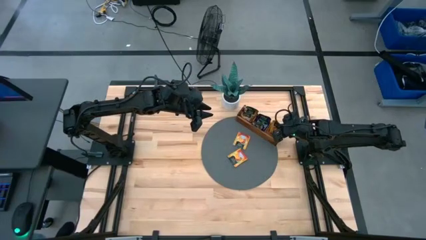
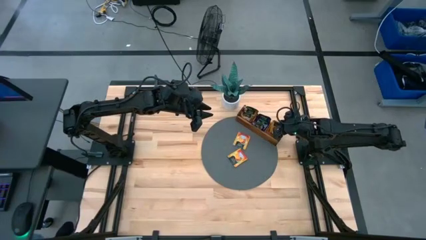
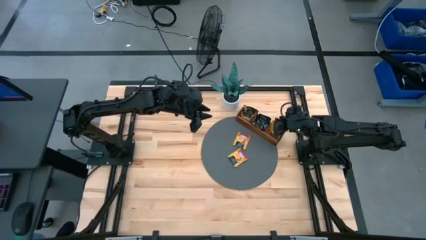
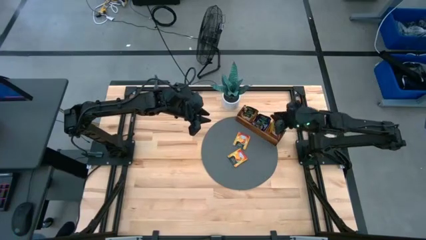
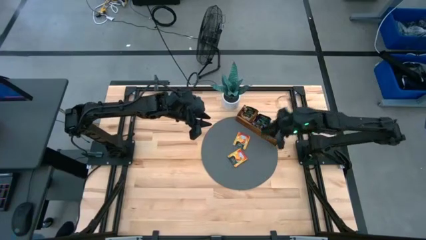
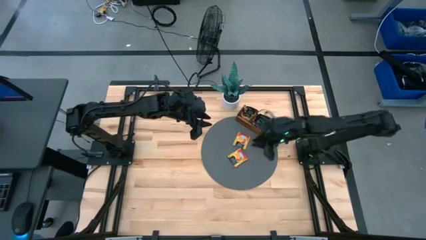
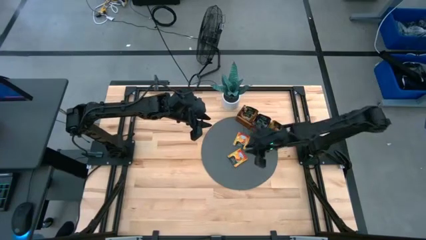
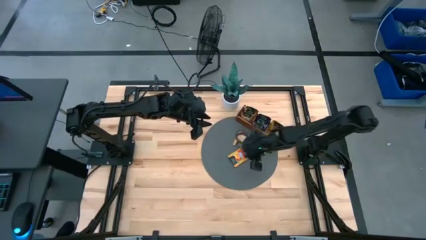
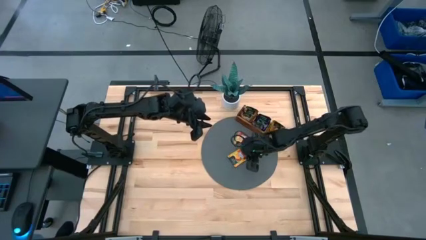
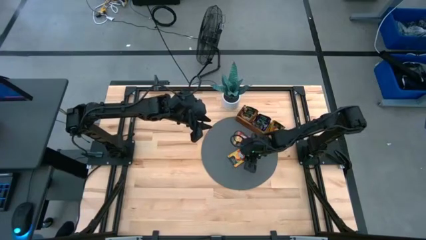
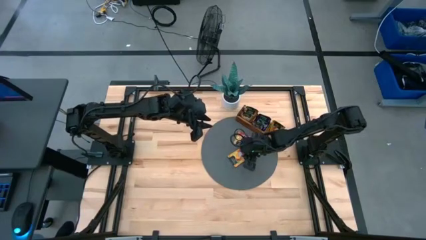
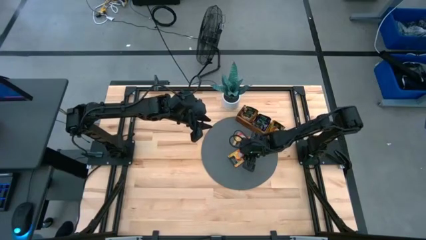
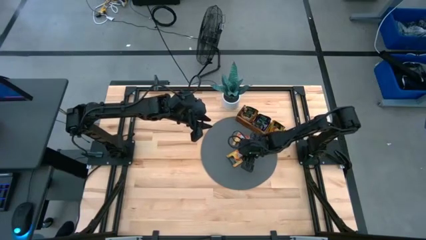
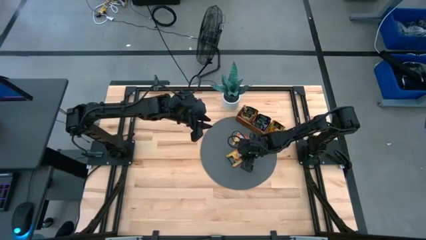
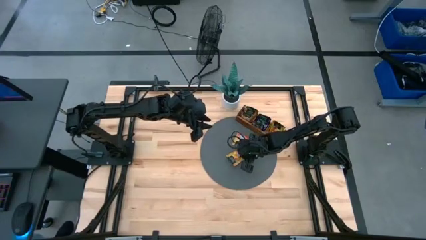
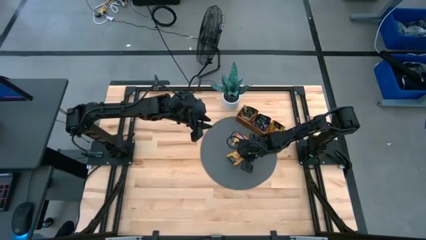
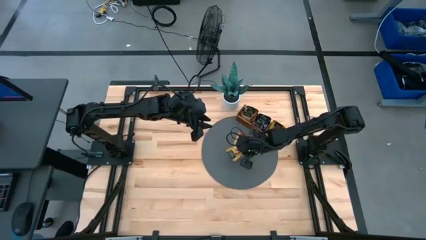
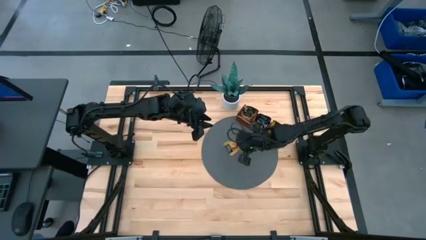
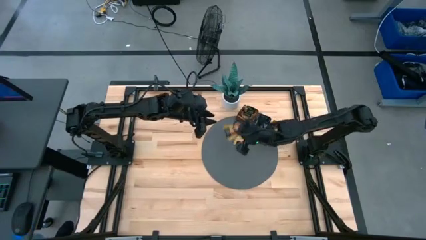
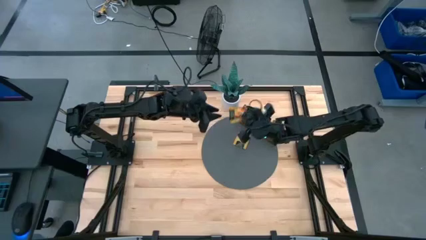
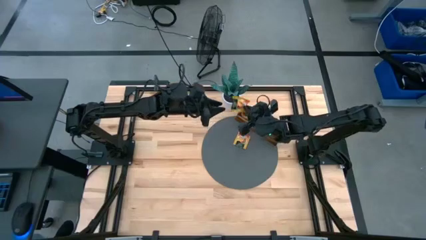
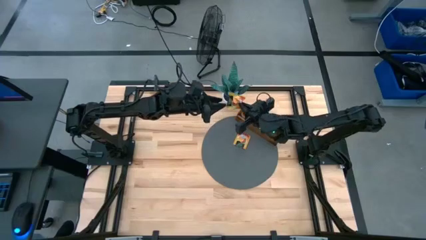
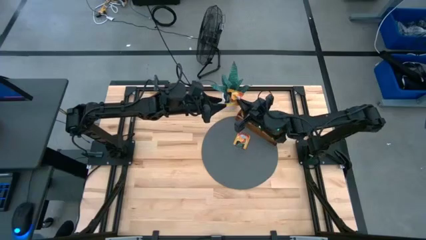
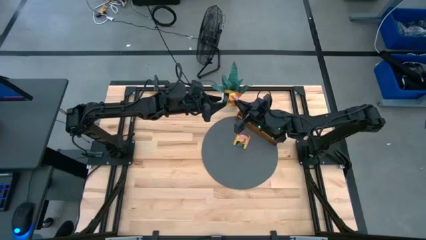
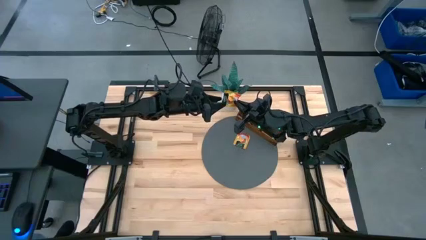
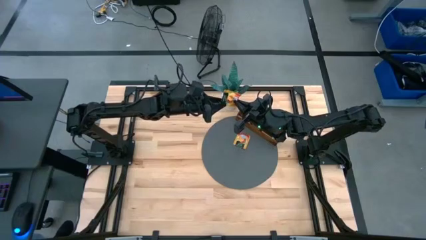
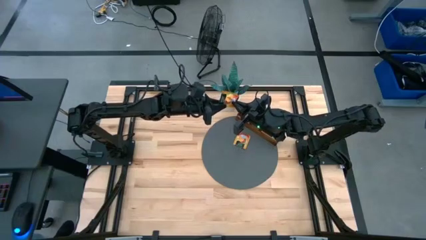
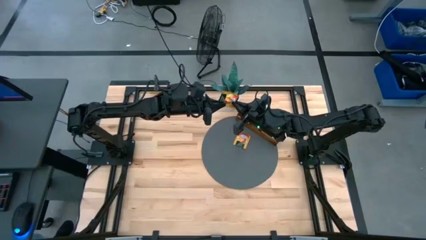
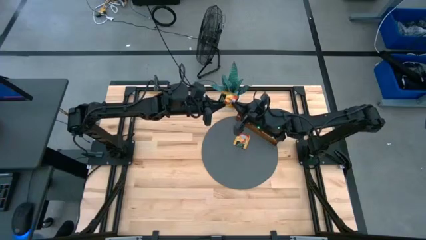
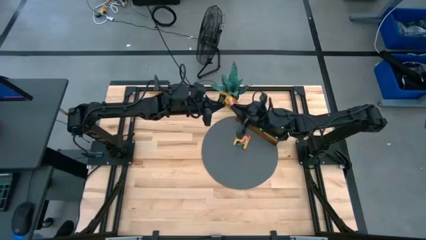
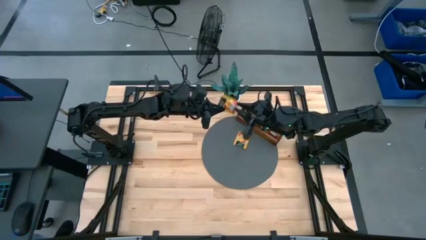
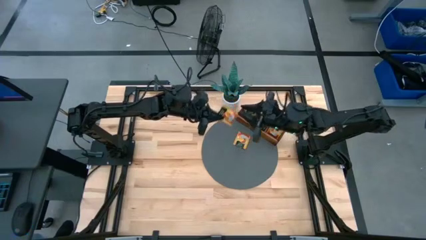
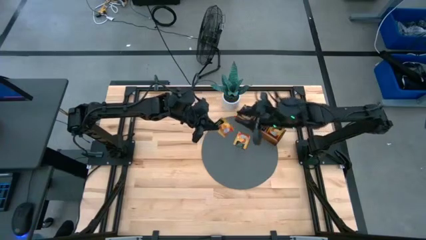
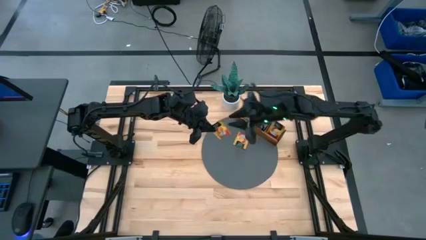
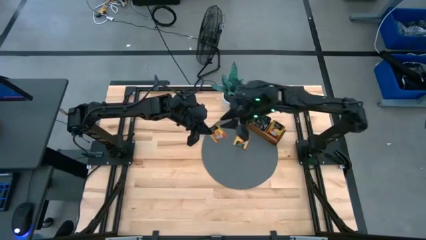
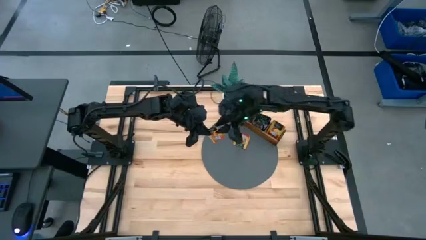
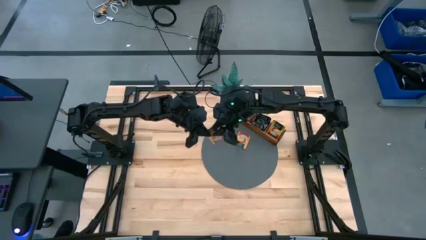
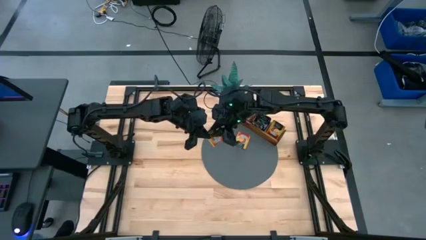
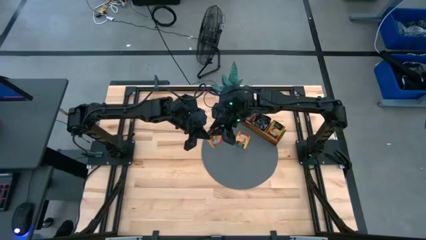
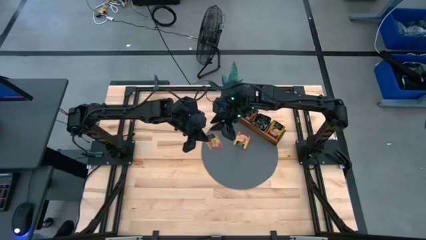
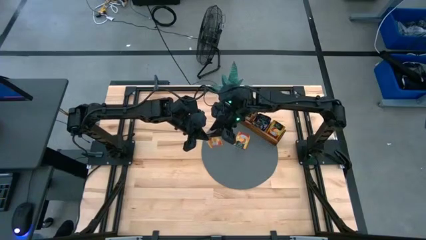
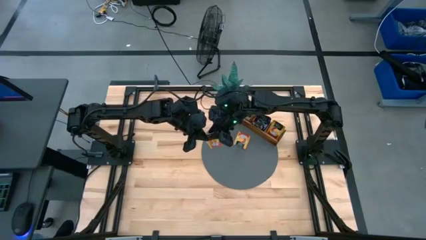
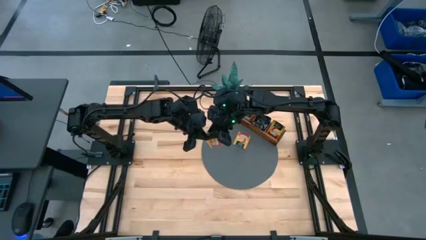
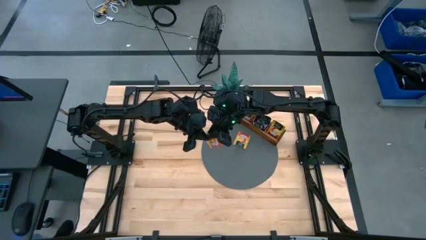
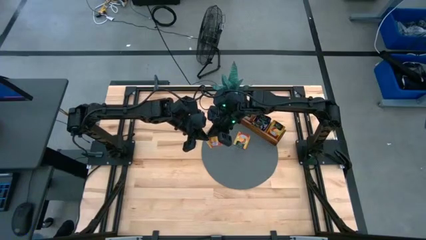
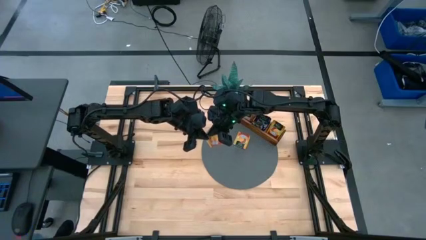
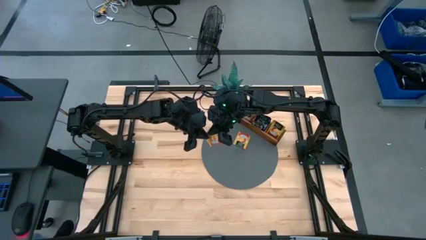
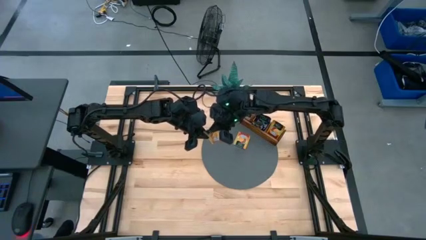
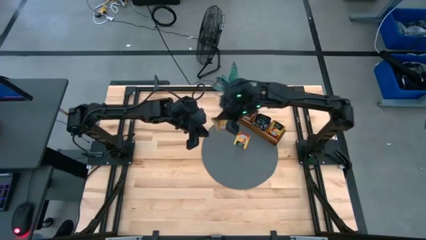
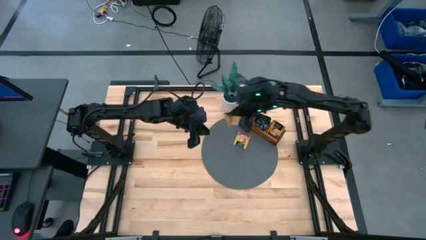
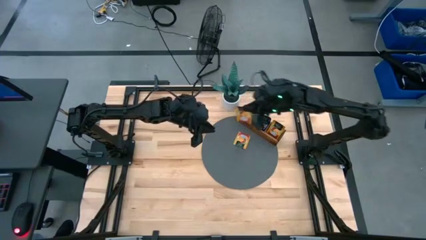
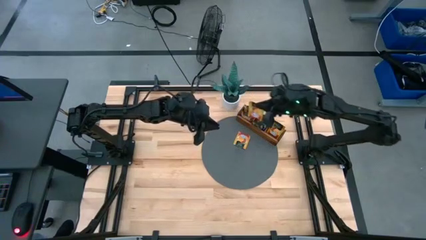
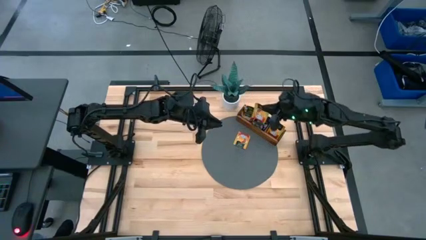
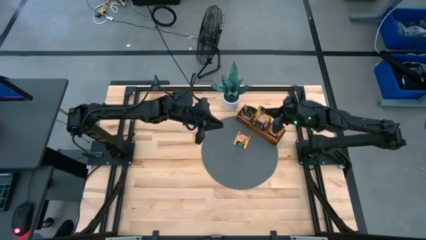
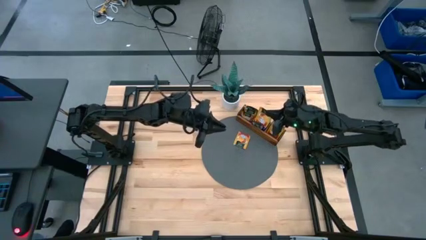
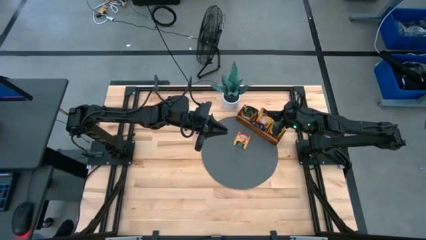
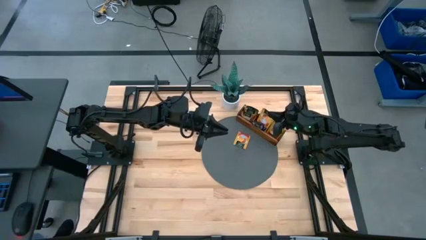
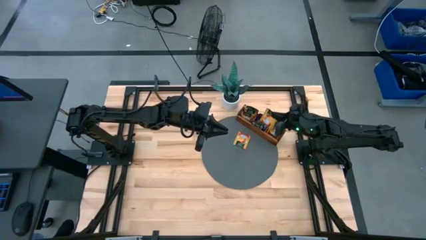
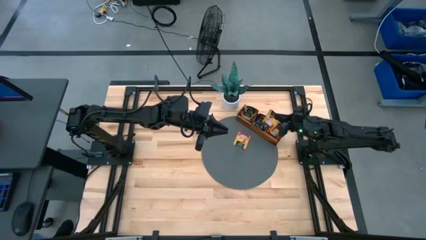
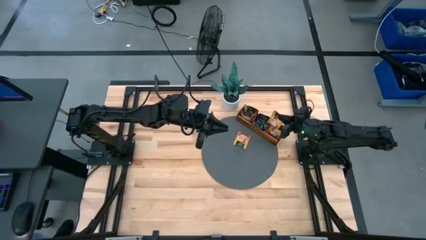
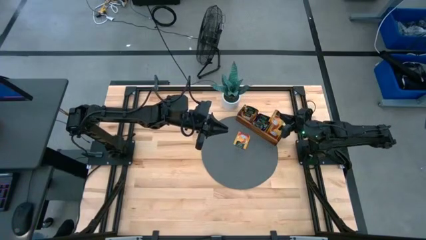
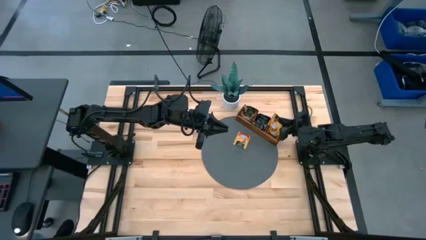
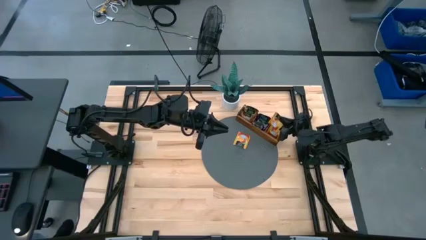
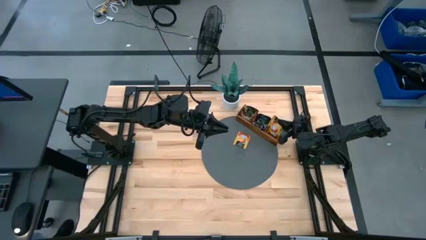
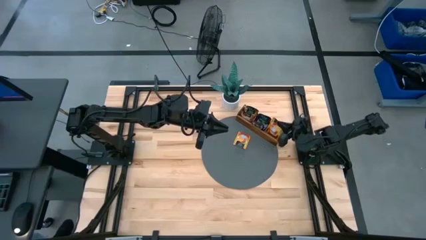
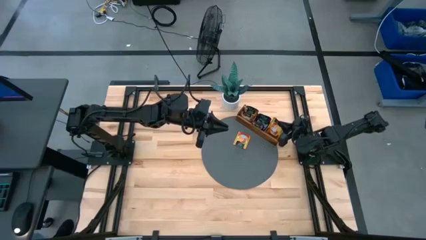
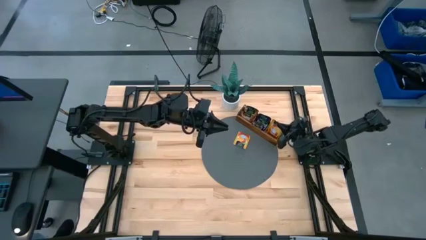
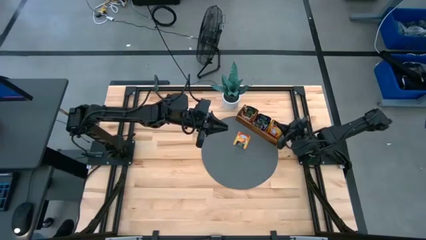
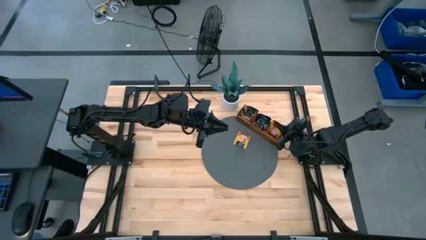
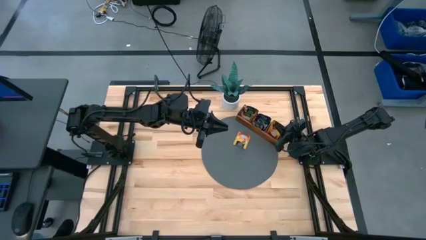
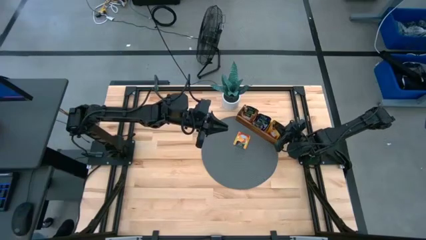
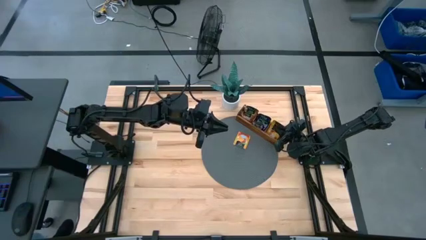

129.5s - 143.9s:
Task: Pick & Place Tea
Put the yellow tea bag into the wooden organizer
